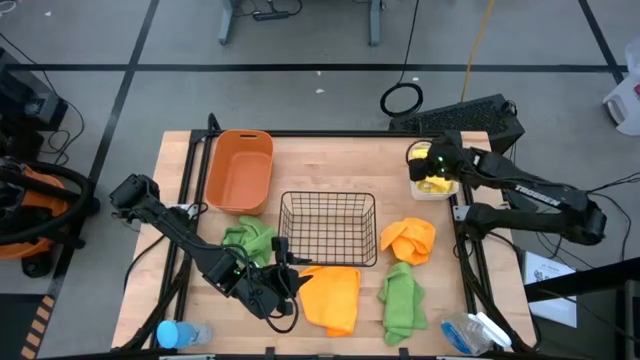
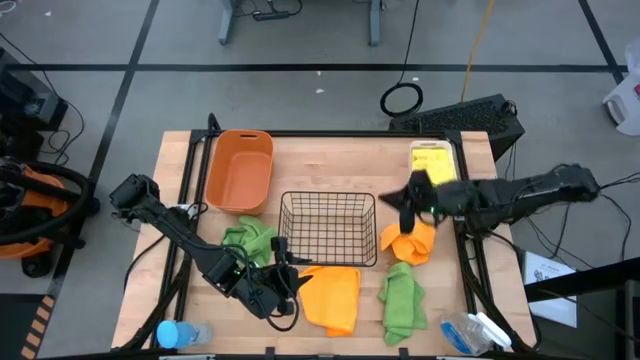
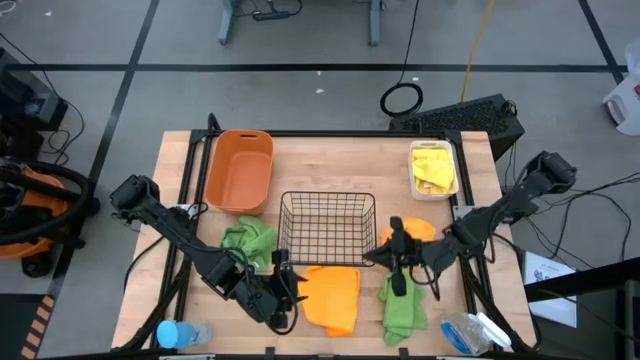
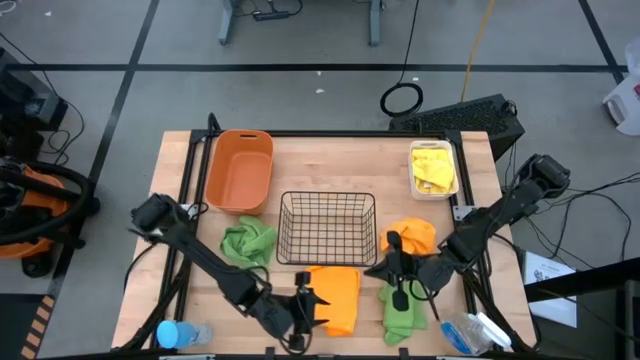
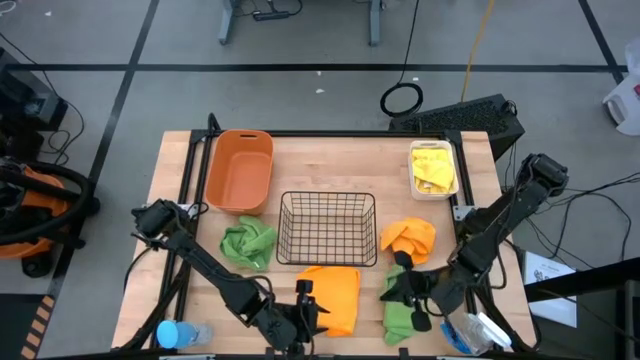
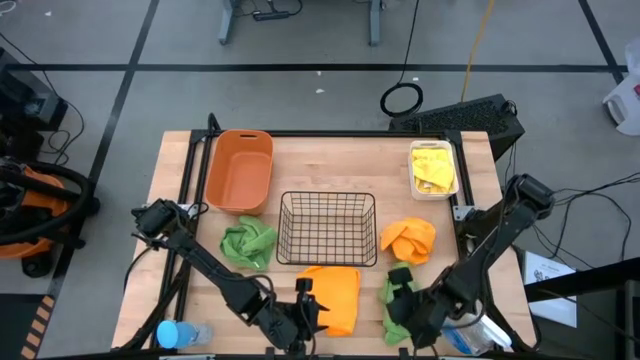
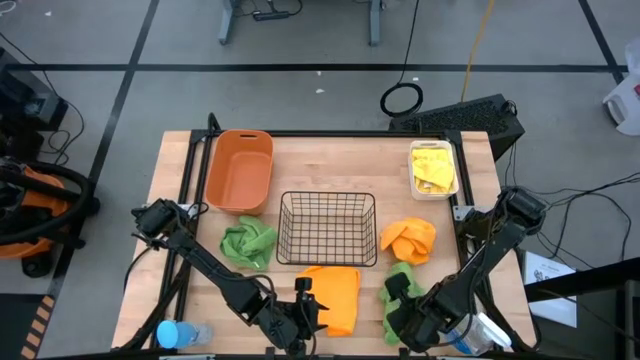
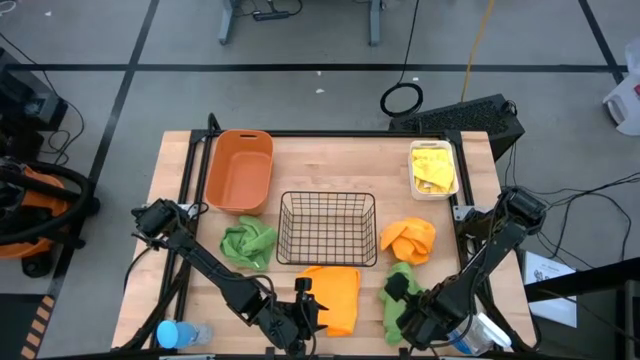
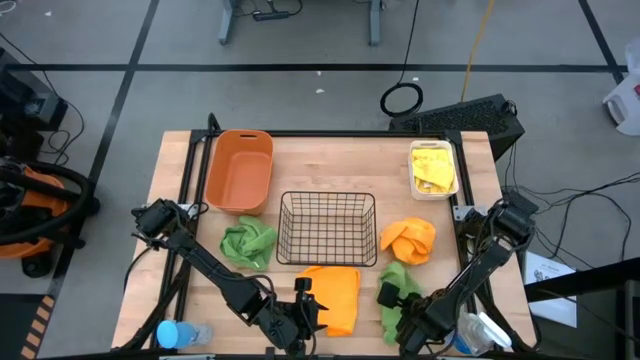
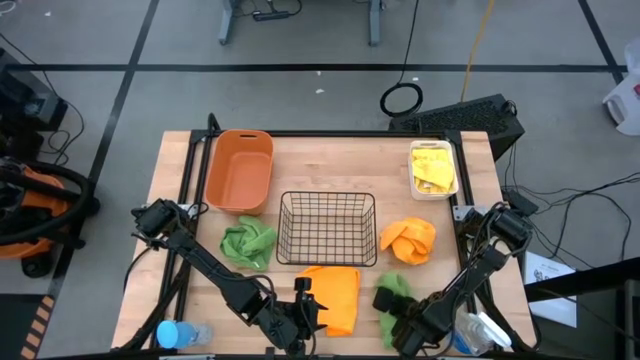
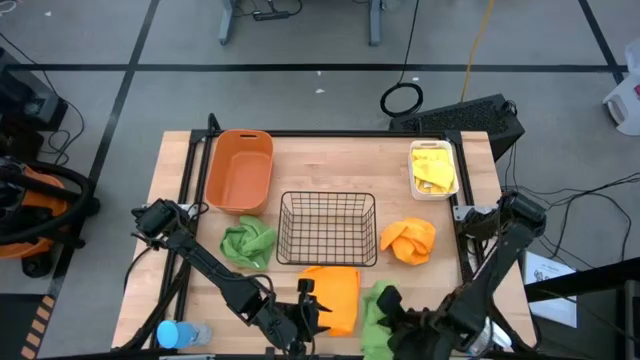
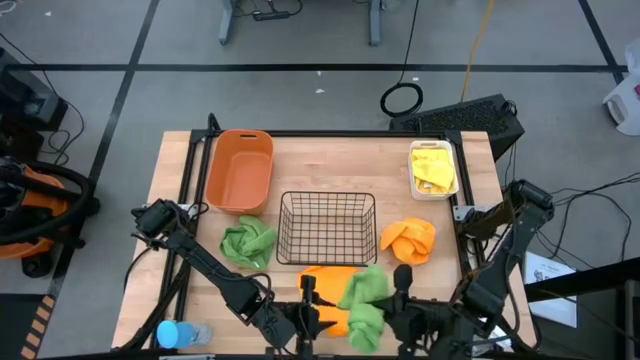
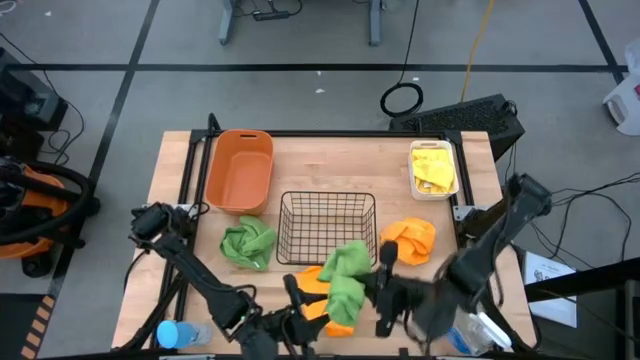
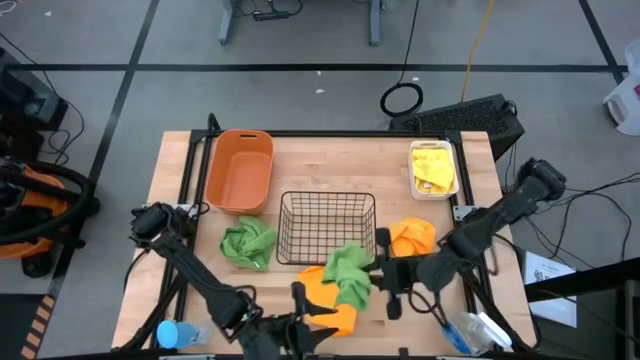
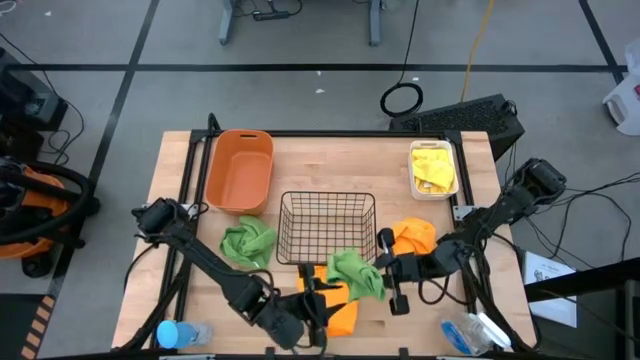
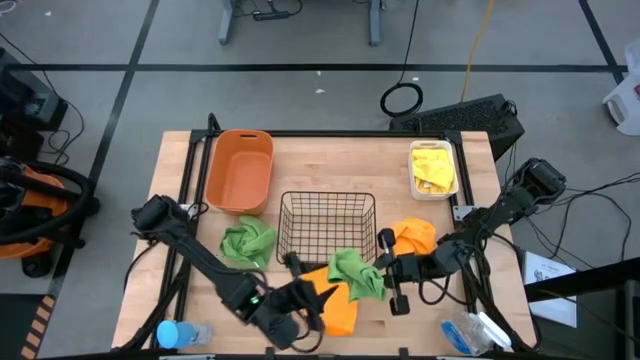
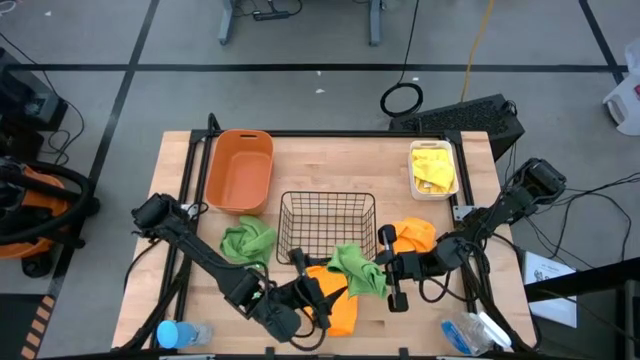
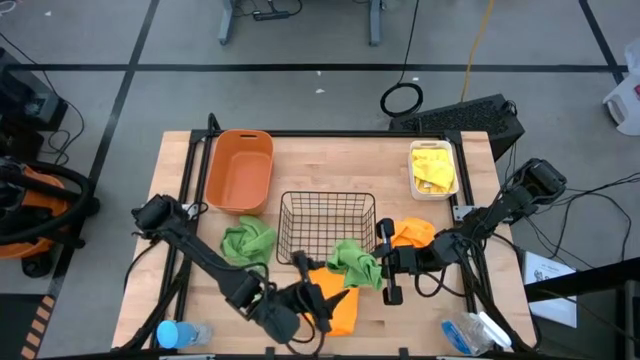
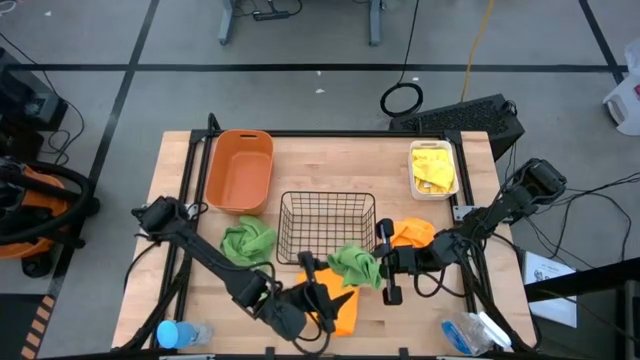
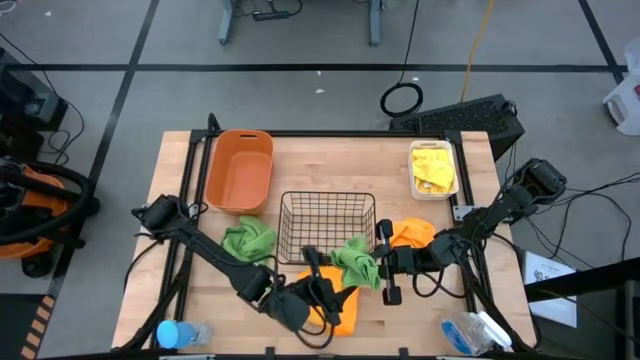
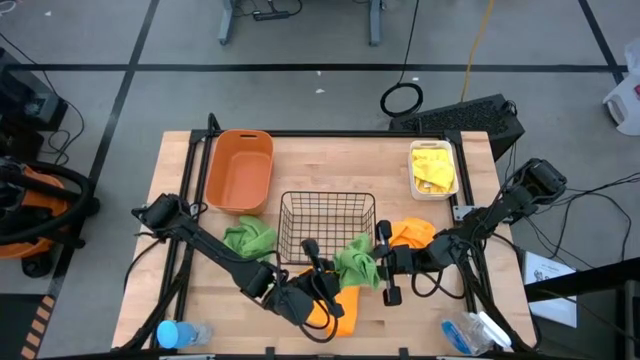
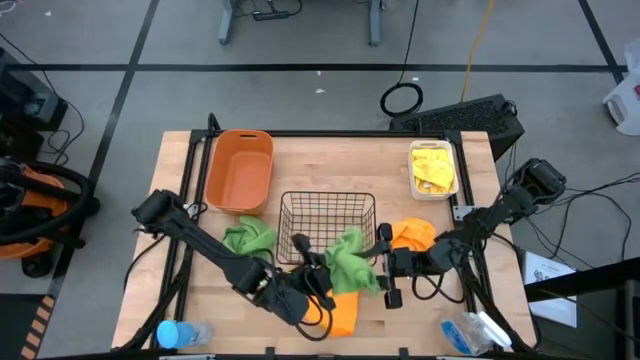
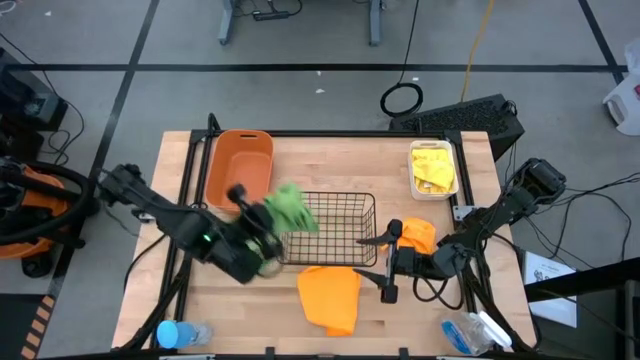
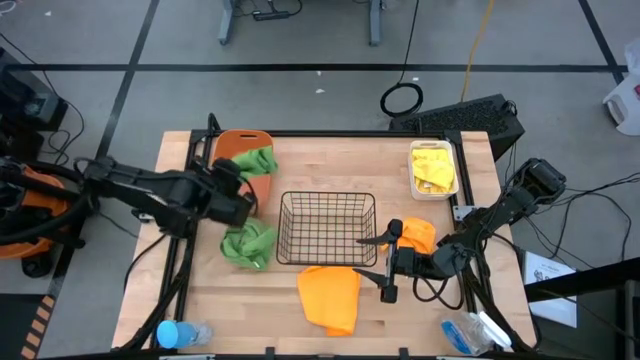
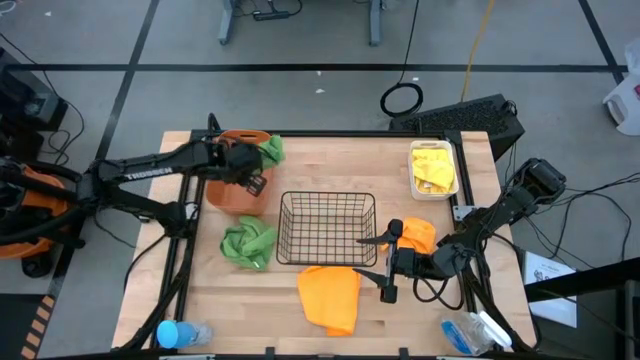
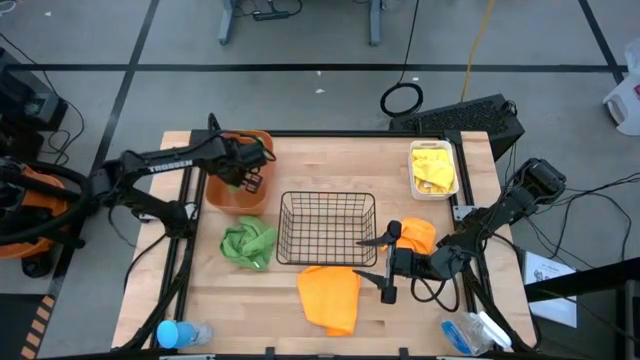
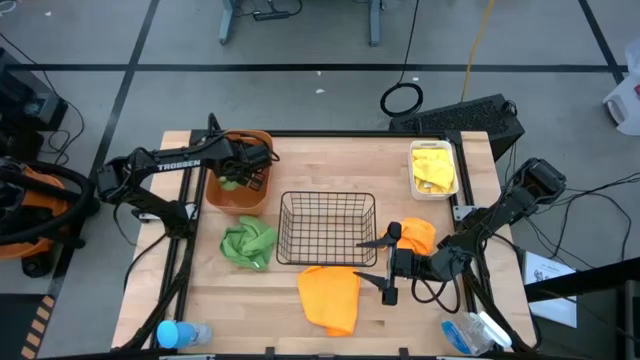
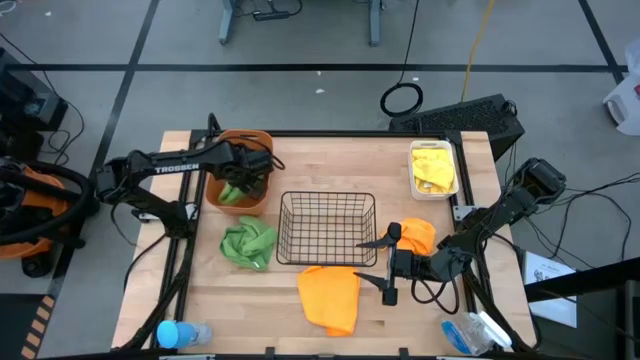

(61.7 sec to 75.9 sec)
Task: Sort microfiber towel by color & place in baskets
Put the right green microfiber towel into the orange bin

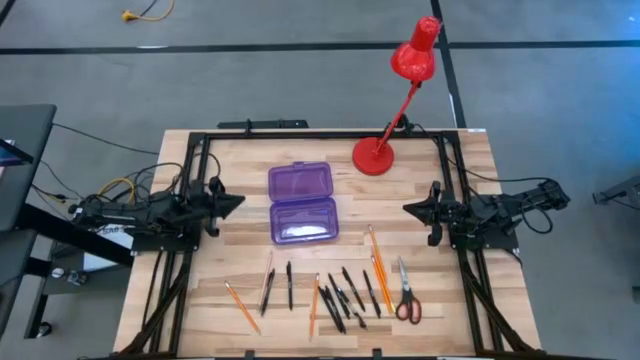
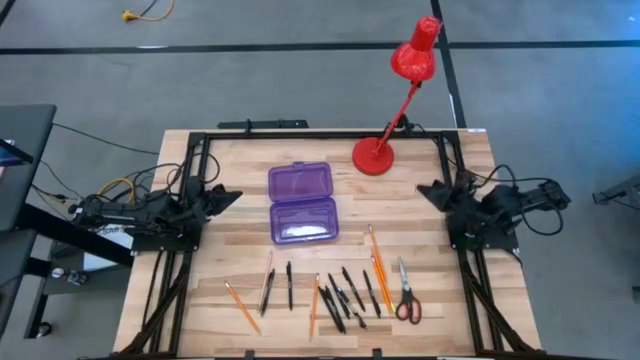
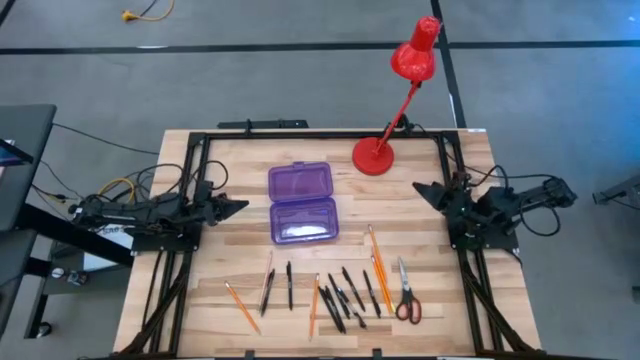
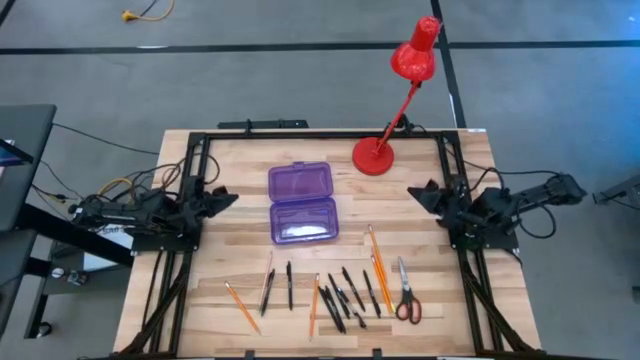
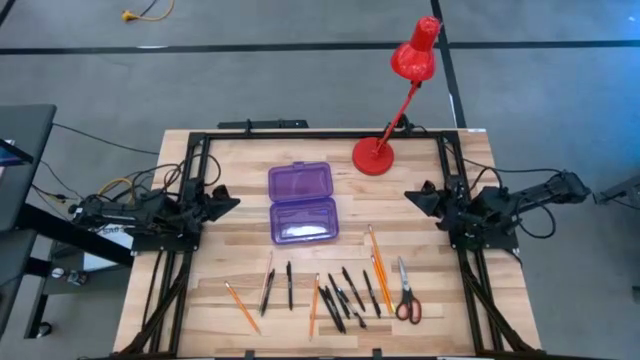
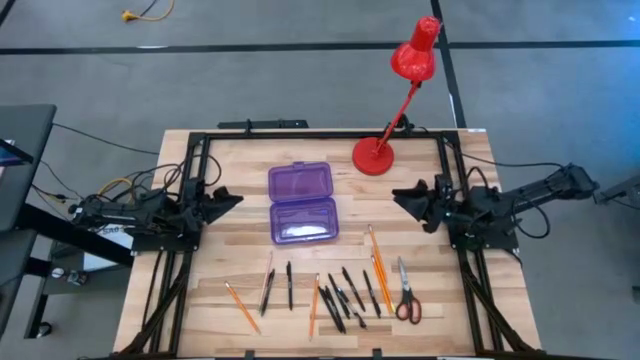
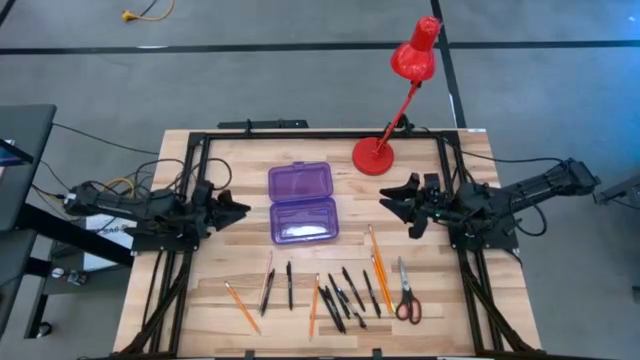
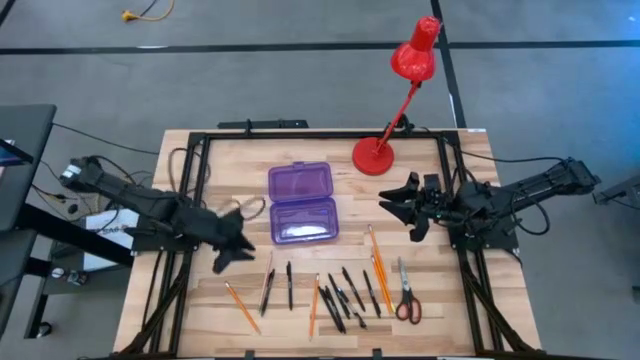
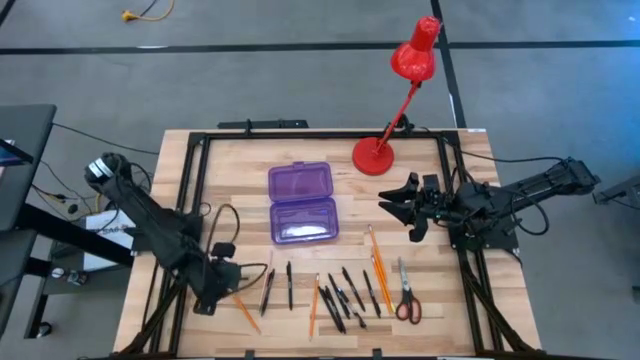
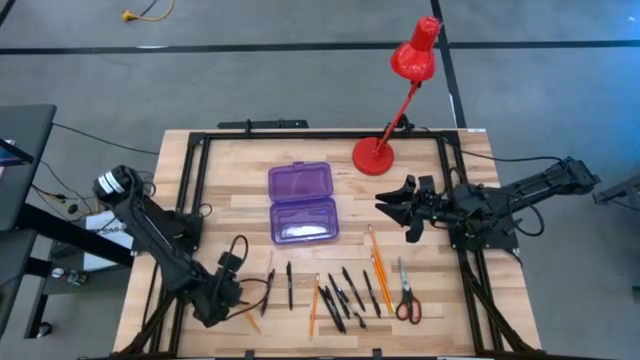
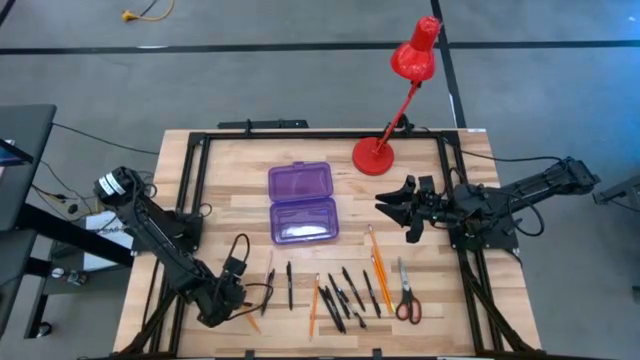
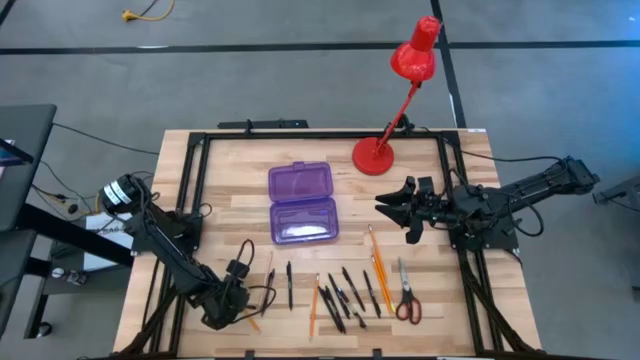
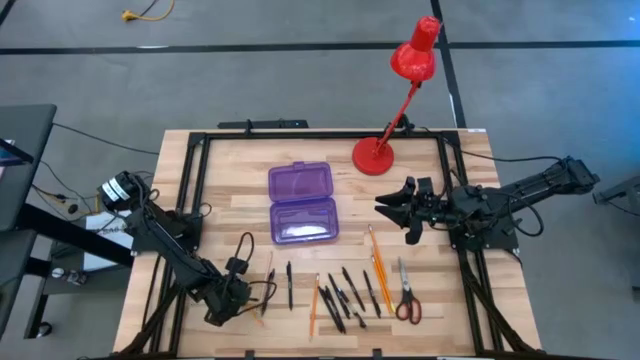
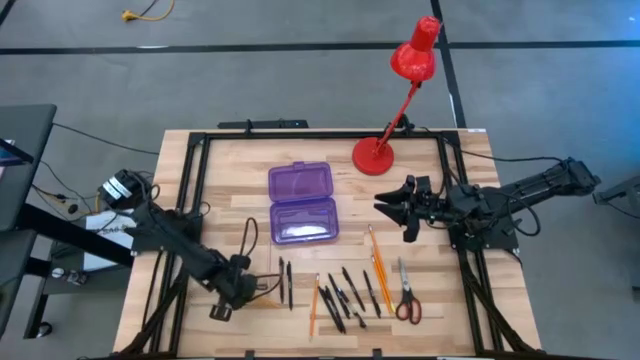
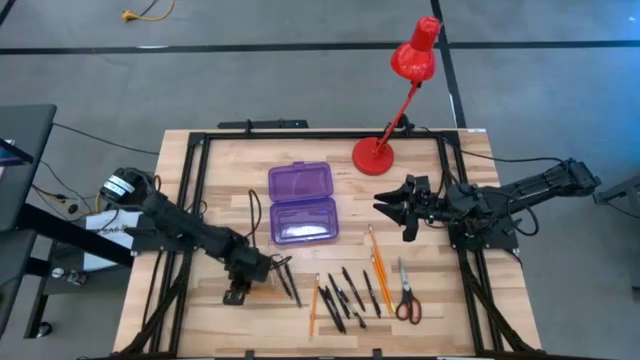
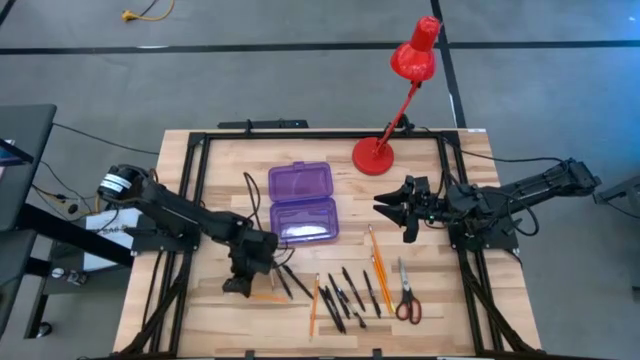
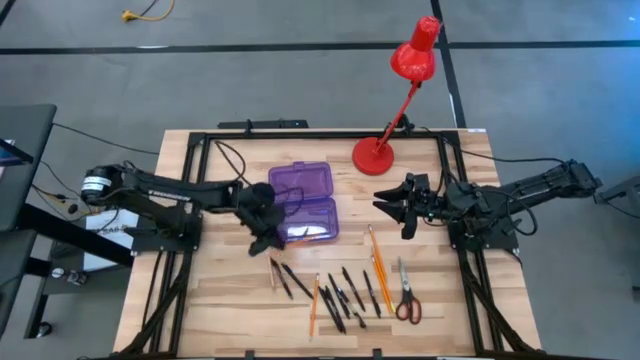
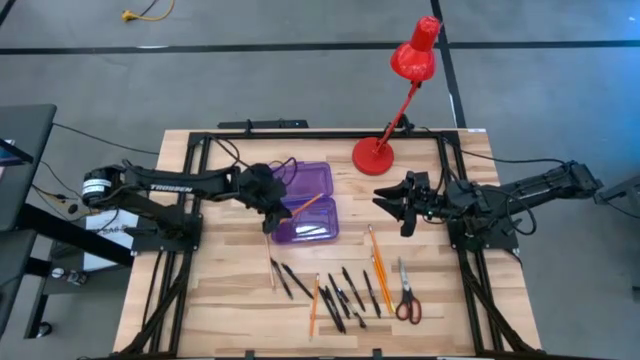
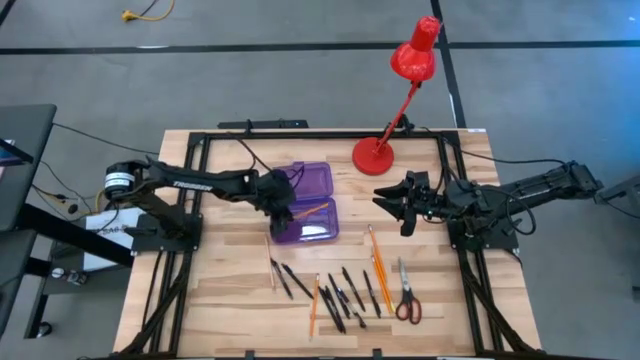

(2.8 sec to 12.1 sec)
Task: Pick & place school supplies into a supply box
Put the orange pencil into the purple supply box
